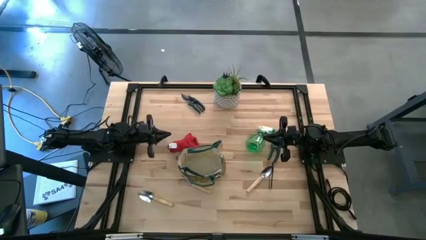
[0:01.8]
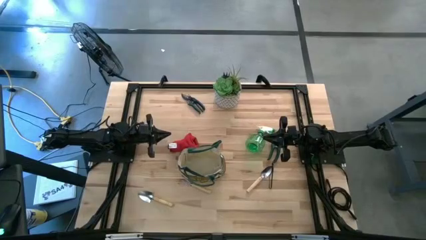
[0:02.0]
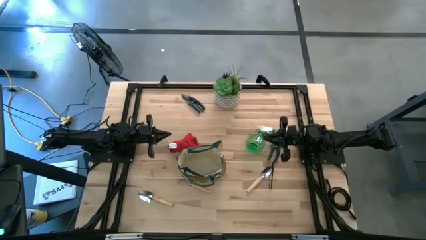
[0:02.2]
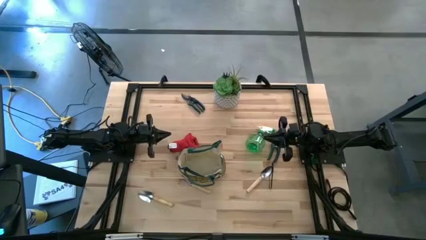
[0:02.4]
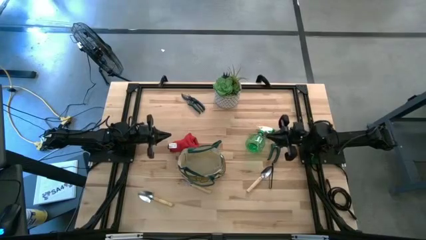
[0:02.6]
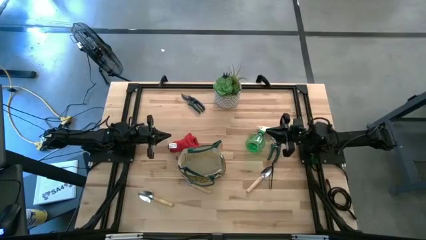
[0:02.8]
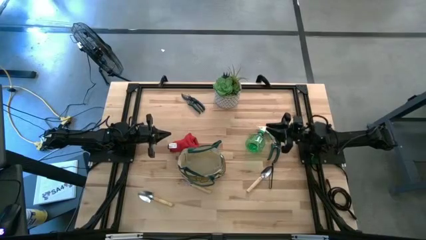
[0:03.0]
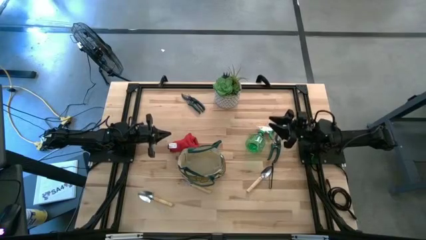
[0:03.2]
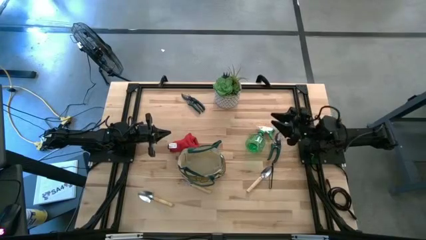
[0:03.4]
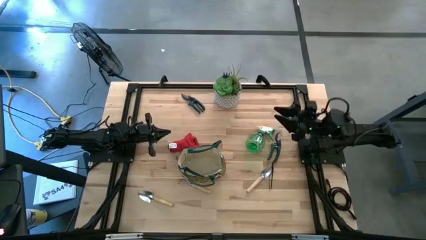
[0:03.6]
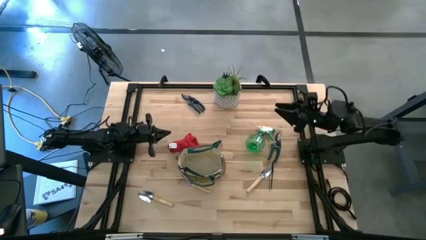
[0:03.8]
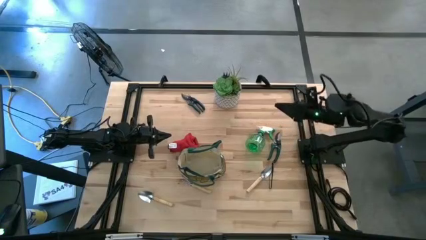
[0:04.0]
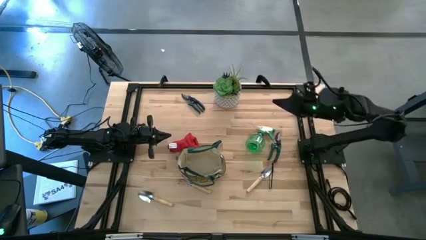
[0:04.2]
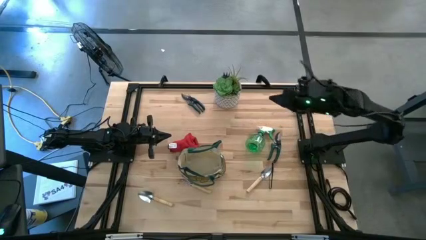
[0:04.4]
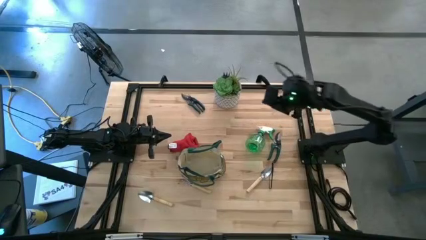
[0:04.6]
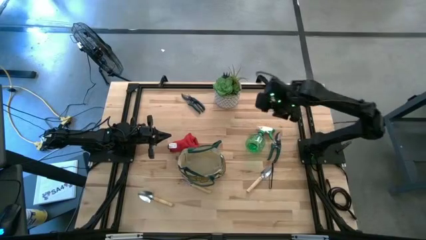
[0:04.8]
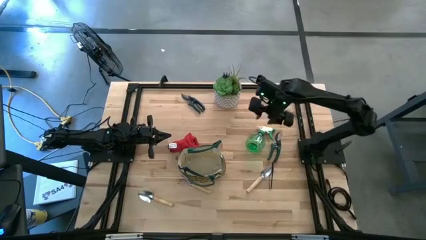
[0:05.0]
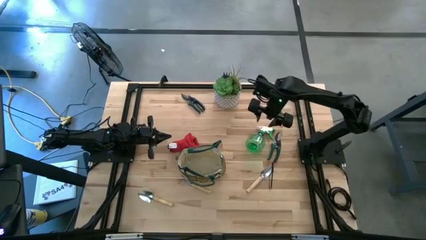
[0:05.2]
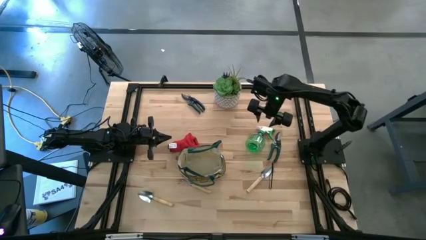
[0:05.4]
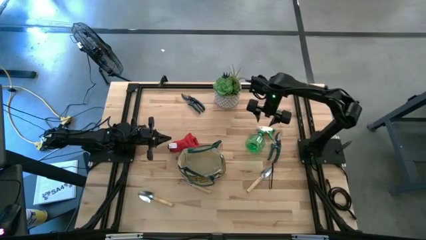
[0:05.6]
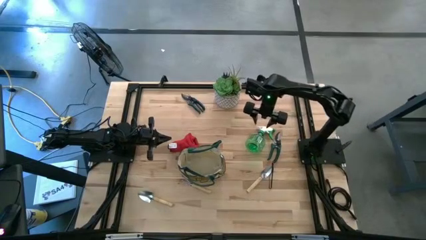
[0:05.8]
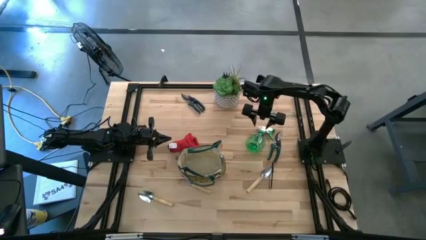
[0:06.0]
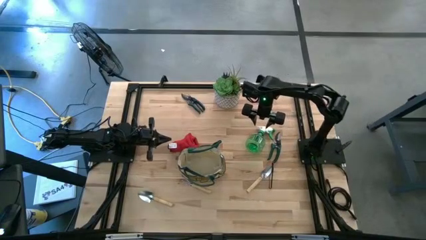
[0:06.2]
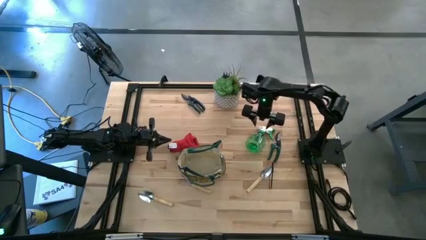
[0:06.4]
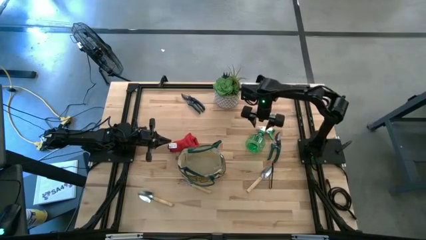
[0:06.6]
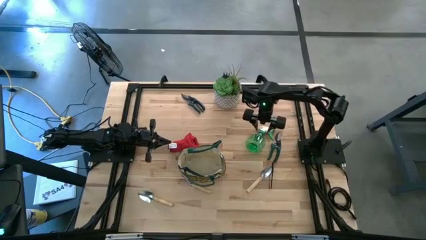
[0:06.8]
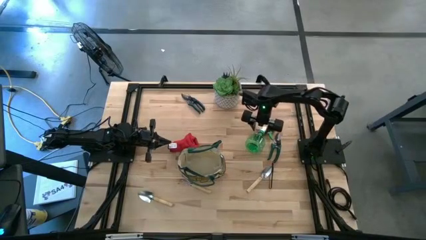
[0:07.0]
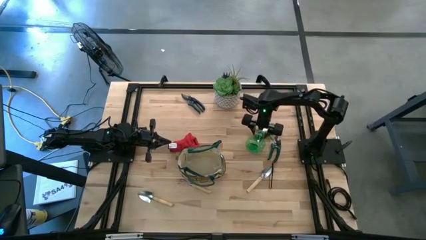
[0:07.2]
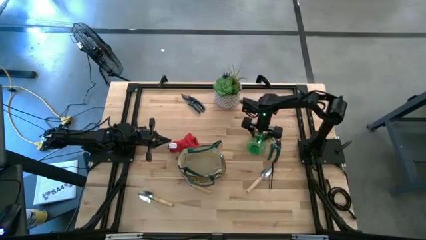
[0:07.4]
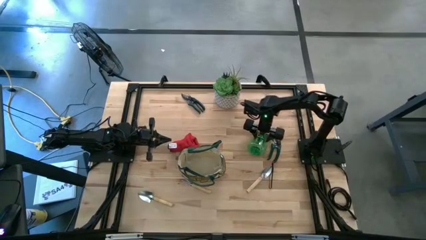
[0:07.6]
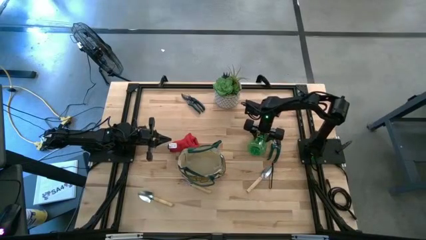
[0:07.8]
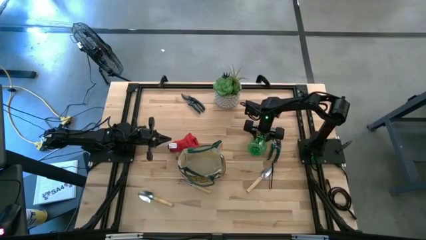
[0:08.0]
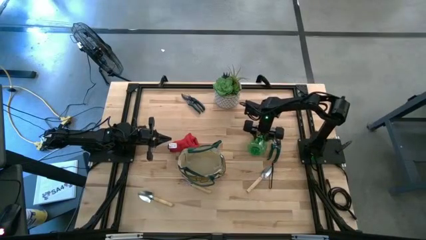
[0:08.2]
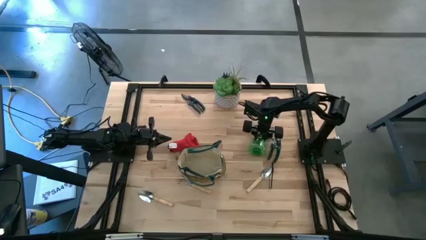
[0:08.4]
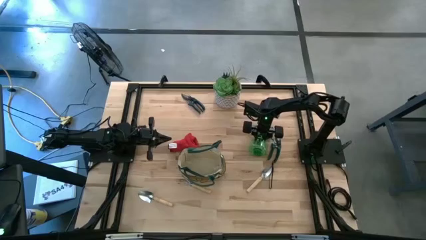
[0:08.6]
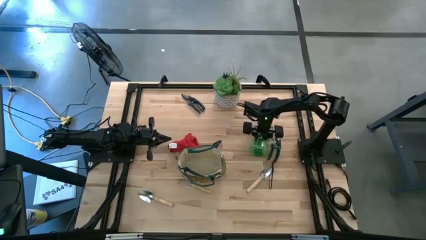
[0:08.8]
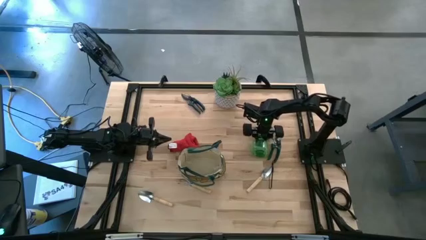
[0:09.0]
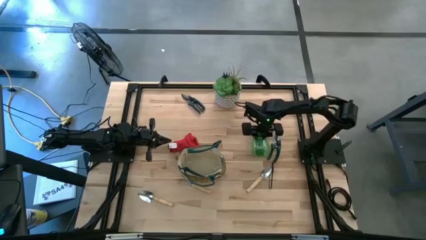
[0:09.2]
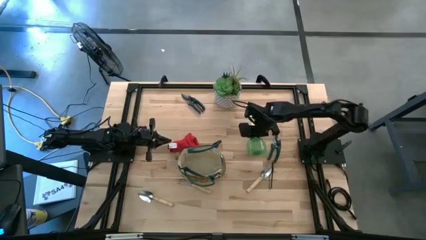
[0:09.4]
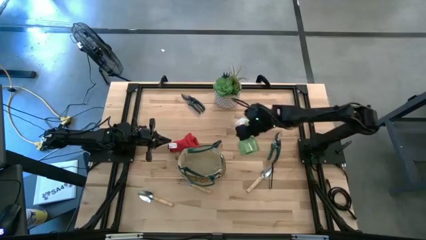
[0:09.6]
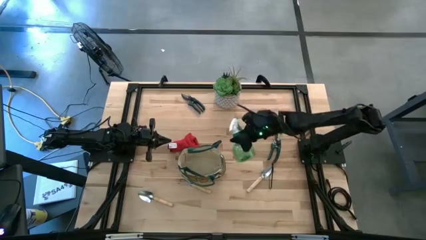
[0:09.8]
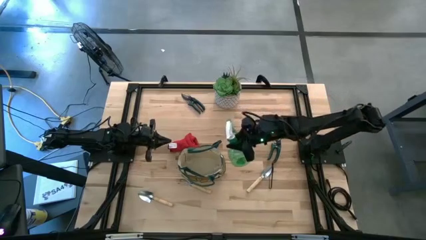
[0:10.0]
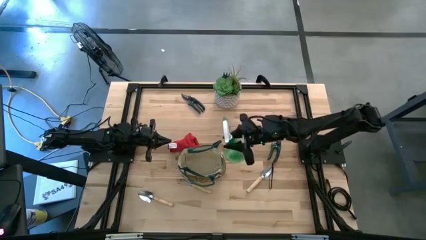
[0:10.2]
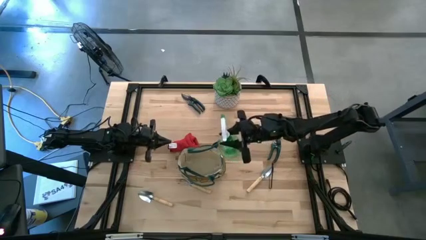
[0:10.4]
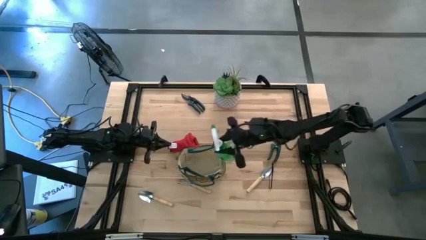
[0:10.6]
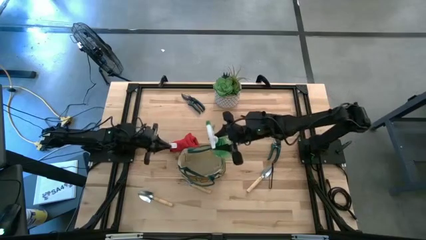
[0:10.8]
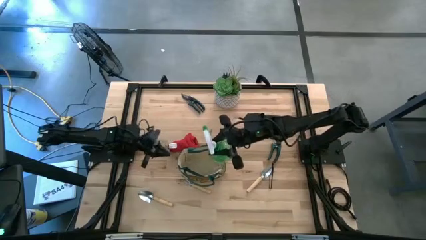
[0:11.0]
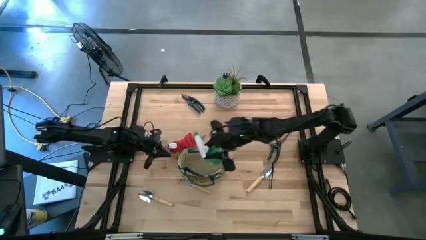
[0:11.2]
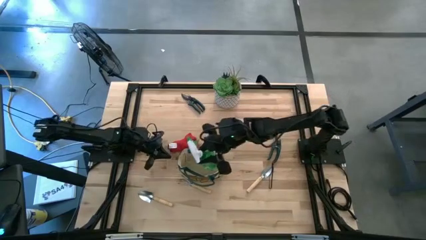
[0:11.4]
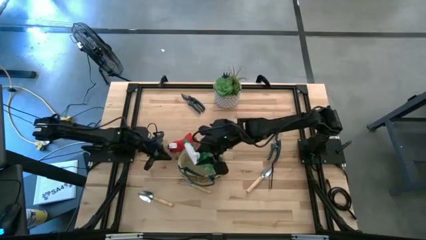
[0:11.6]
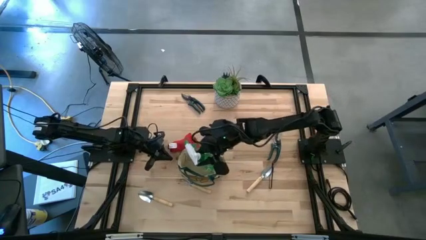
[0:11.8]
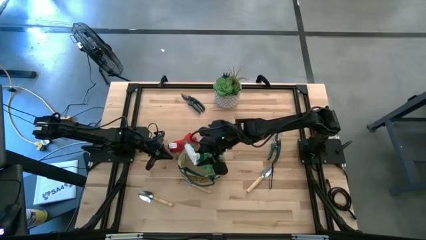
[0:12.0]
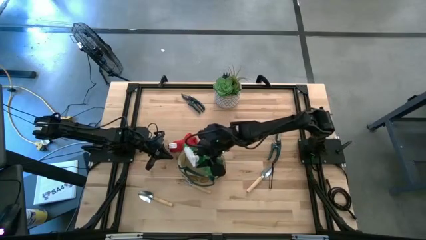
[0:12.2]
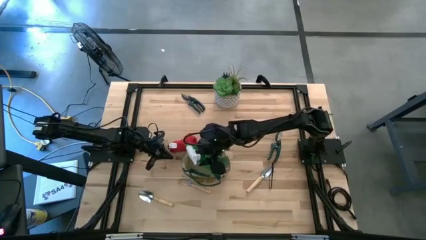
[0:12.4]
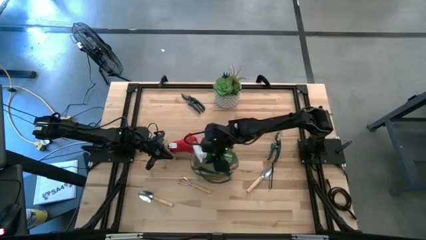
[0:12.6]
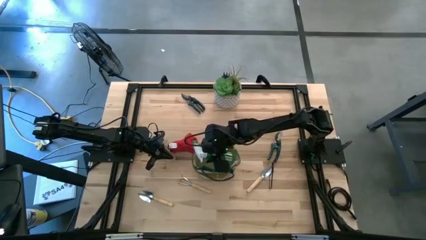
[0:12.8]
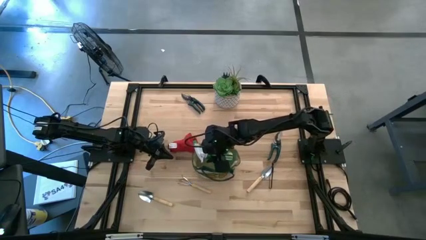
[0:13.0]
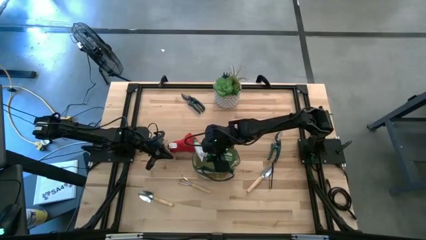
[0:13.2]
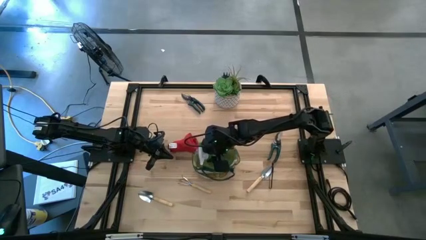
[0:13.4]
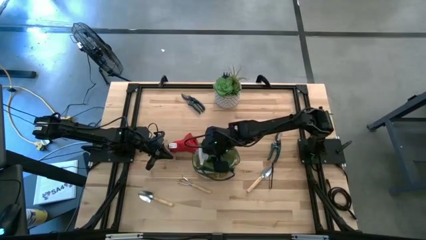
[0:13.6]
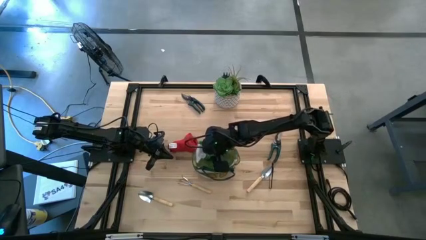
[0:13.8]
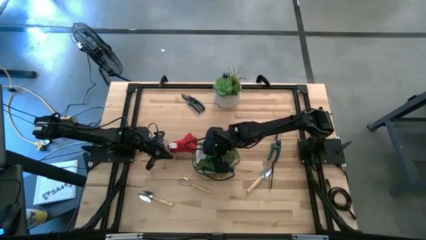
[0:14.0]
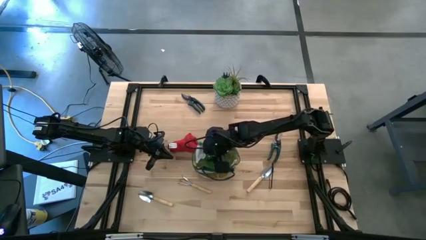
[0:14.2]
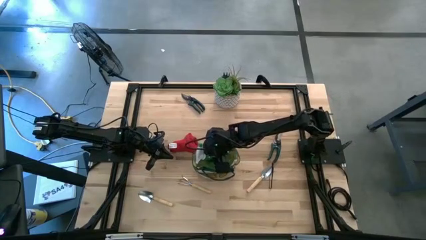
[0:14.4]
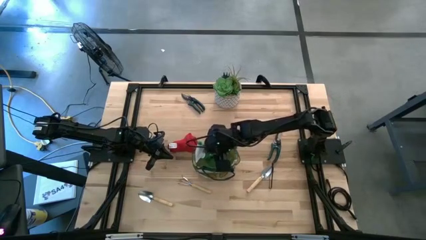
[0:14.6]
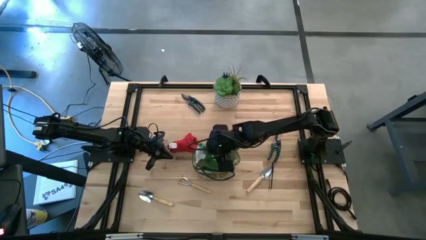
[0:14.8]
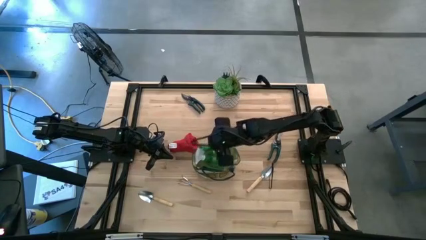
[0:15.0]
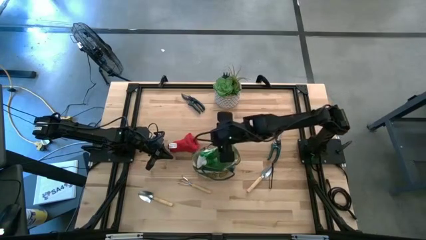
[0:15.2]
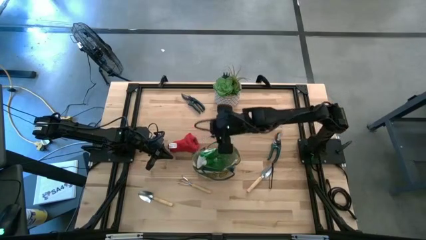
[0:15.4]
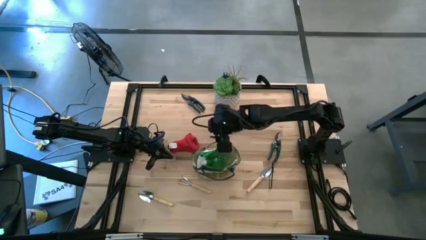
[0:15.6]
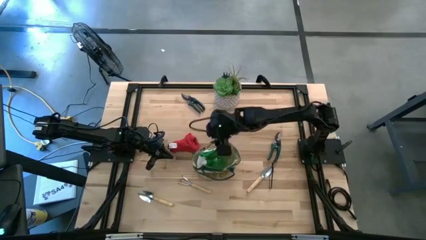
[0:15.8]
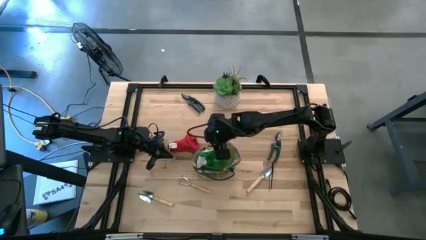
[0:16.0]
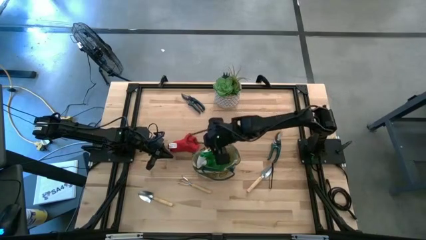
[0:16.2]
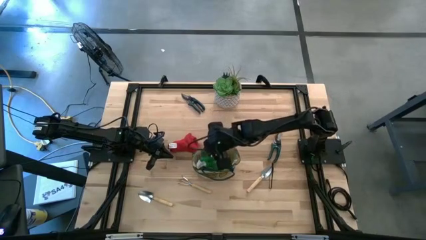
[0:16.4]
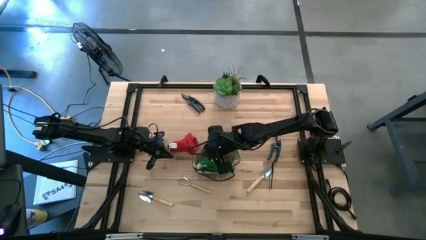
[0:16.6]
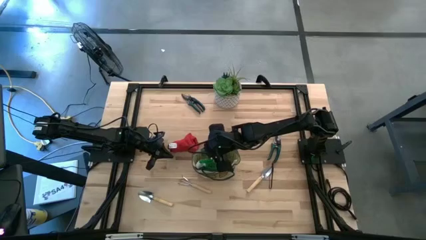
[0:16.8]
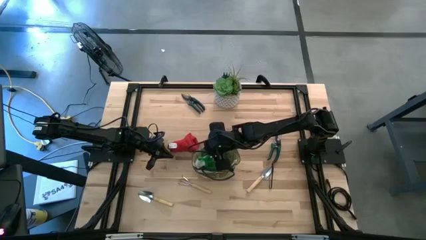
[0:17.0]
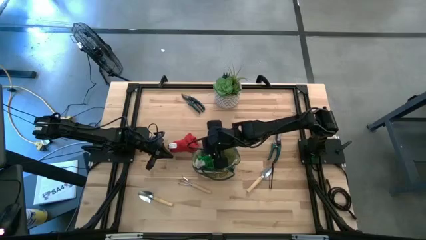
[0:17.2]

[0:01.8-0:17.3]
Task: Pick & Place Garden tools in Gardening bag
Put the green spray bottle into the white gardening bag
